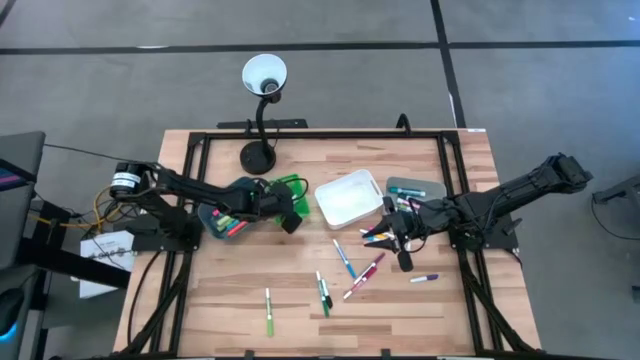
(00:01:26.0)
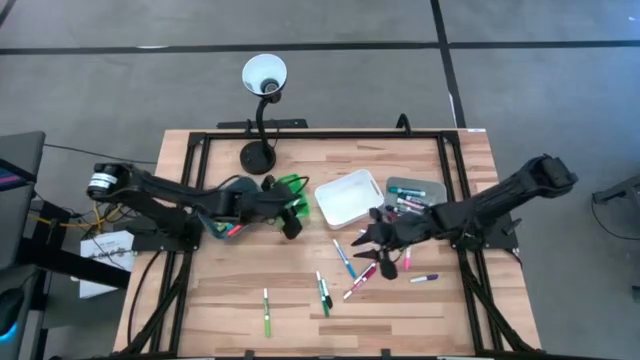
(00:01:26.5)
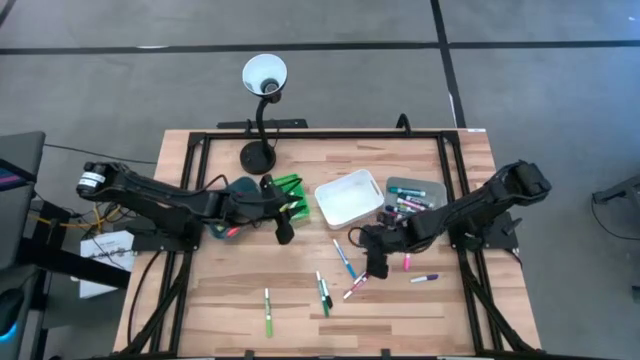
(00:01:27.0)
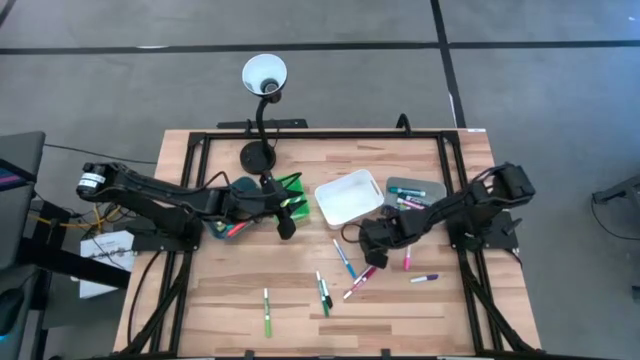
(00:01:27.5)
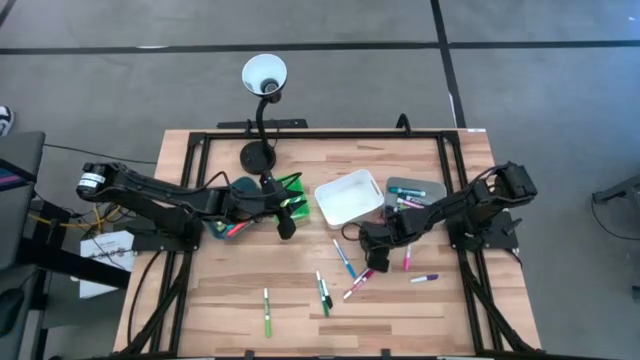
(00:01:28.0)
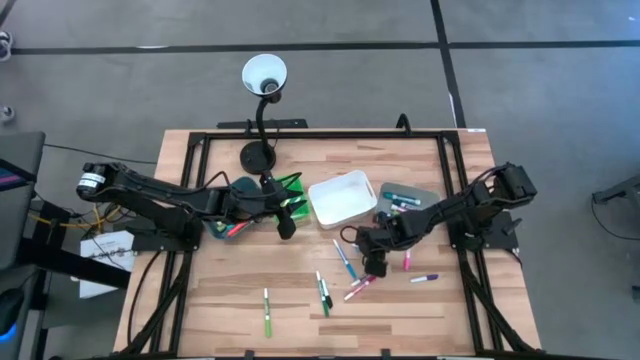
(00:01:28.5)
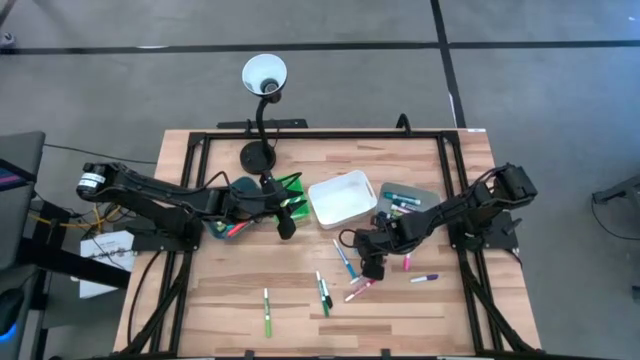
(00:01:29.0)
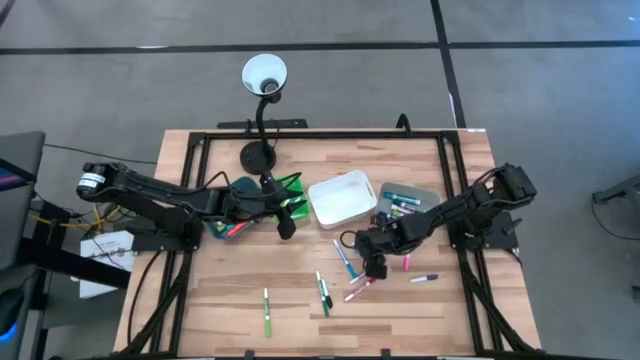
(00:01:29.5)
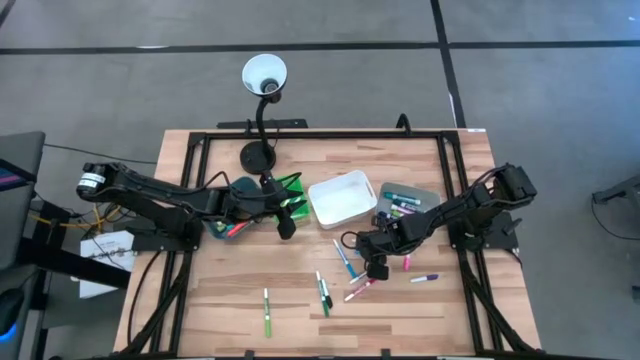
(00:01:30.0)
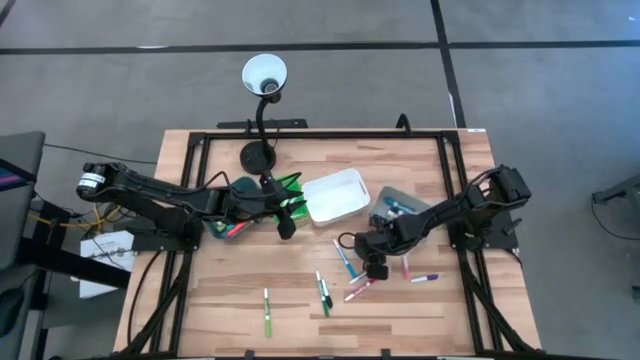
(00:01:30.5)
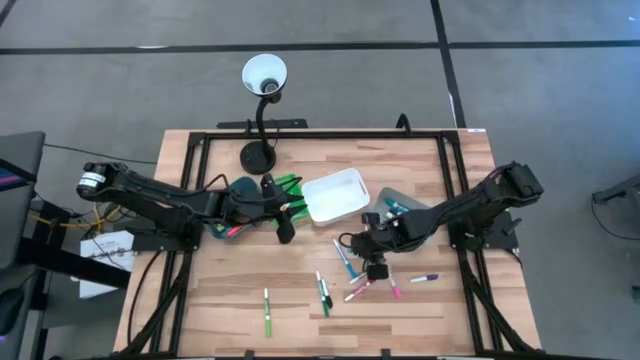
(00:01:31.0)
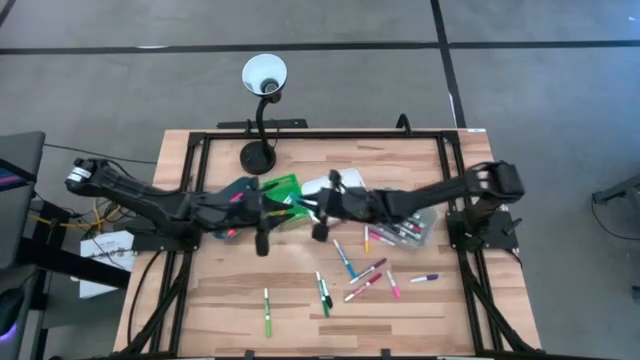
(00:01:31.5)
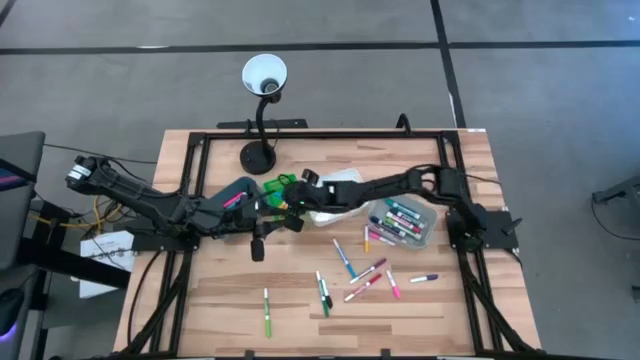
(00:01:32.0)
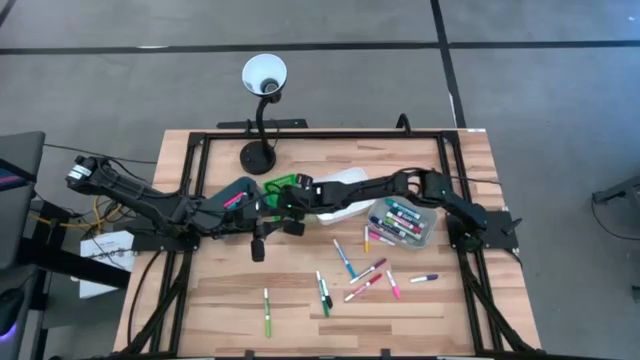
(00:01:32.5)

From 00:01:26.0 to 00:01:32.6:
Task: Pick & Place Markers
Put the blue and white highlighter pen into the green bin

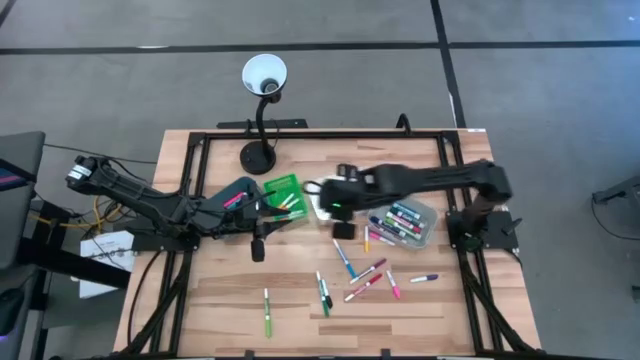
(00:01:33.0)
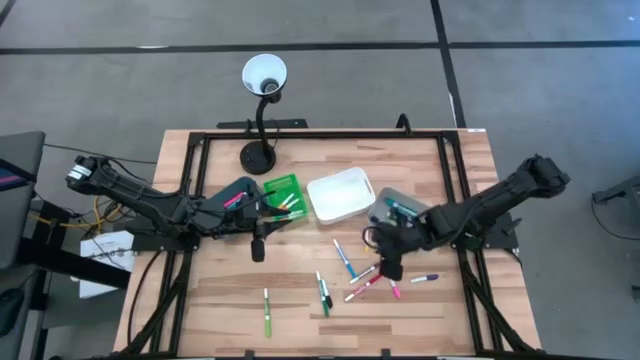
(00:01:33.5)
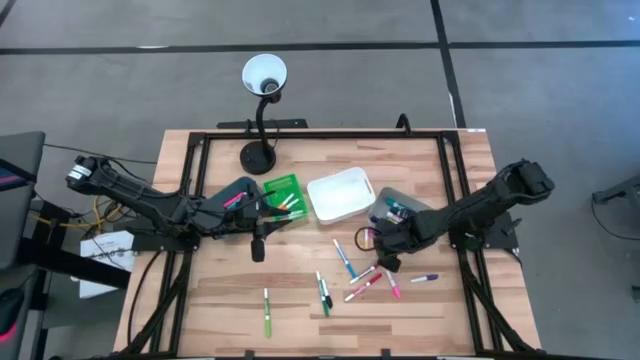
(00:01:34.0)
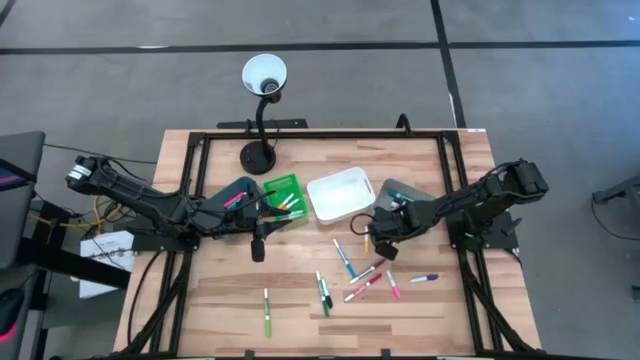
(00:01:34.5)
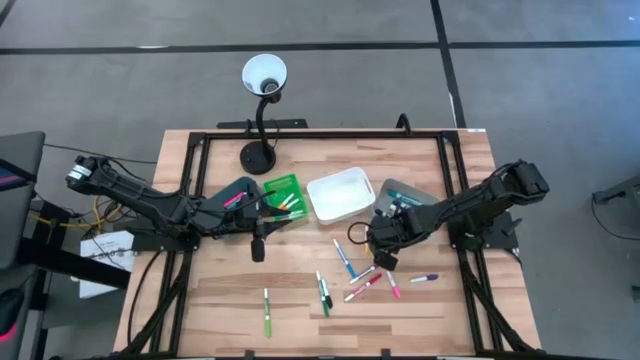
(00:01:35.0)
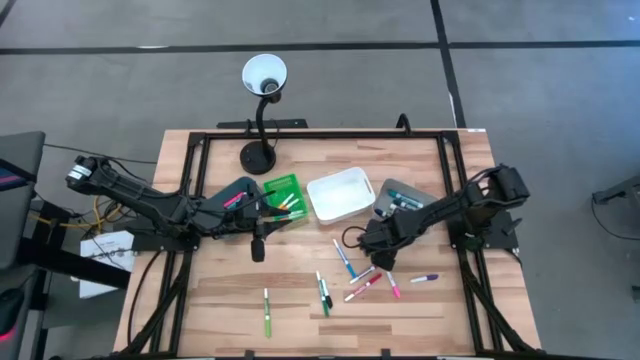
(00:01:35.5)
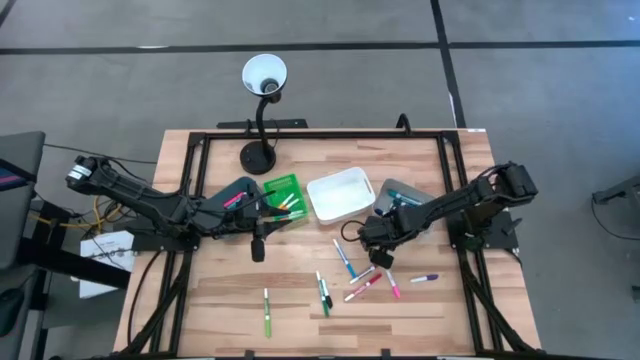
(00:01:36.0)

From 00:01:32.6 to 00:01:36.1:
Put the pink and white highlighter pen into the green bin

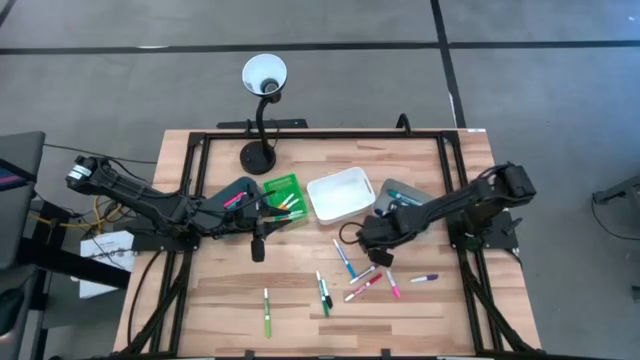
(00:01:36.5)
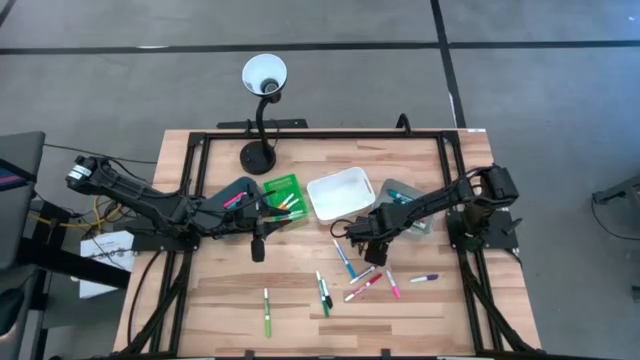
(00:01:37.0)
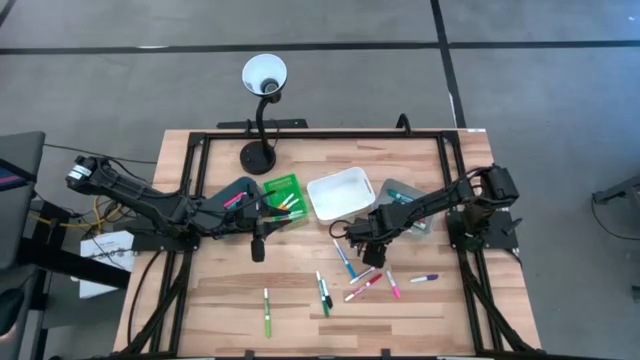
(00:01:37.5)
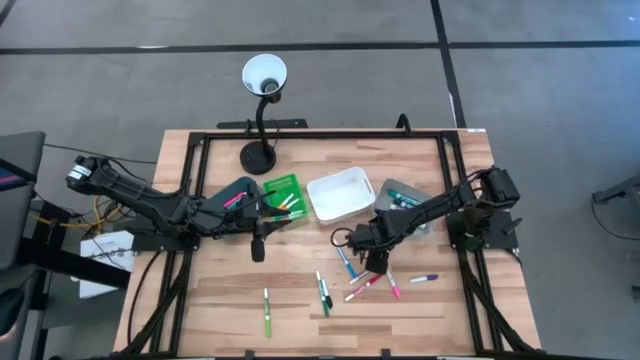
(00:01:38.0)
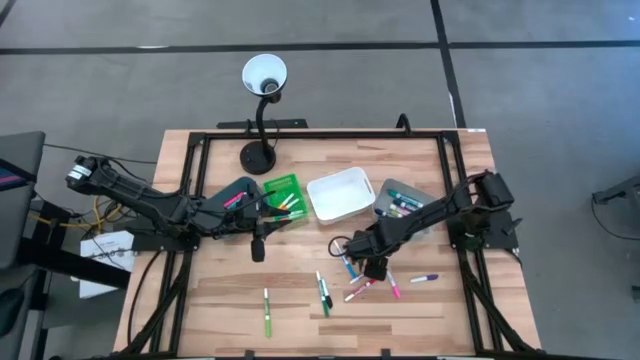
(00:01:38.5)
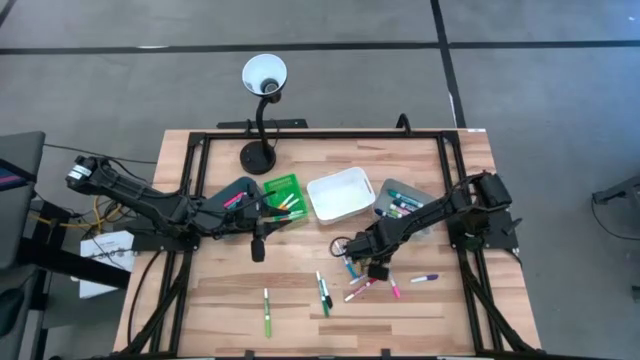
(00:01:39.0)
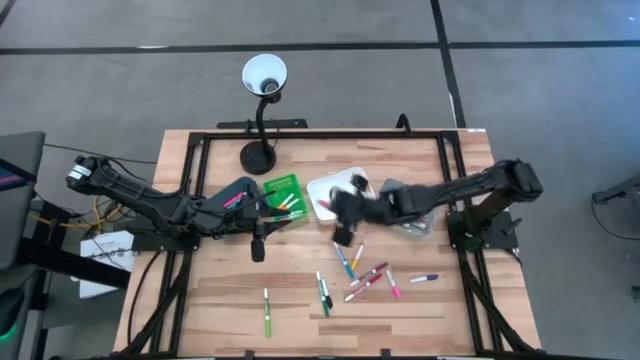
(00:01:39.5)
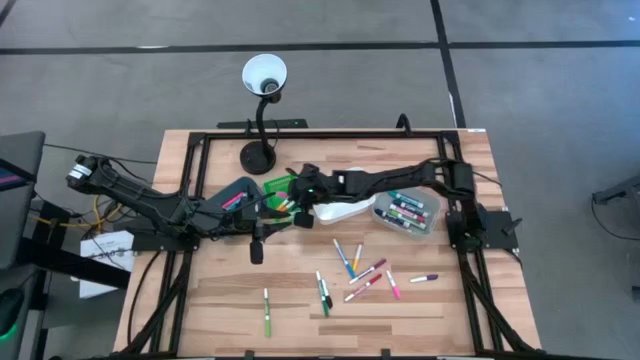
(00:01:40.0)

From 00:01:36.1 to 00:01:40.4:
Put the pink and white highlighter pen into the green bin

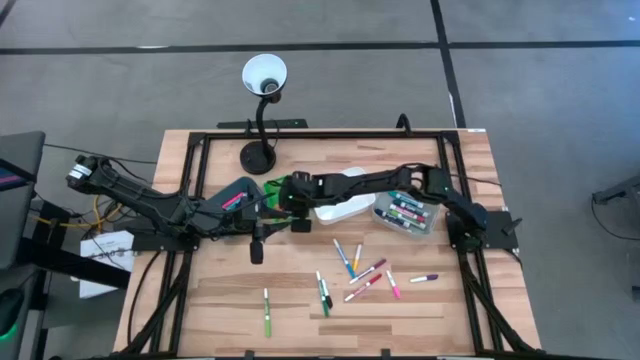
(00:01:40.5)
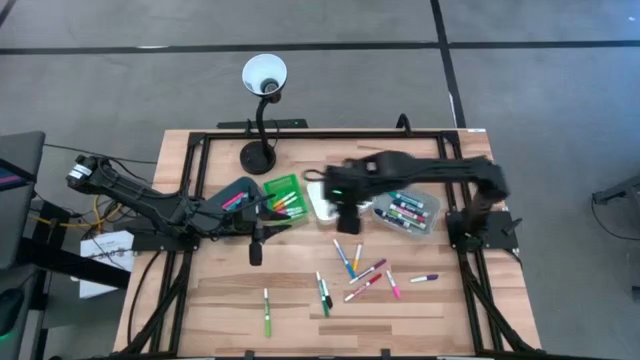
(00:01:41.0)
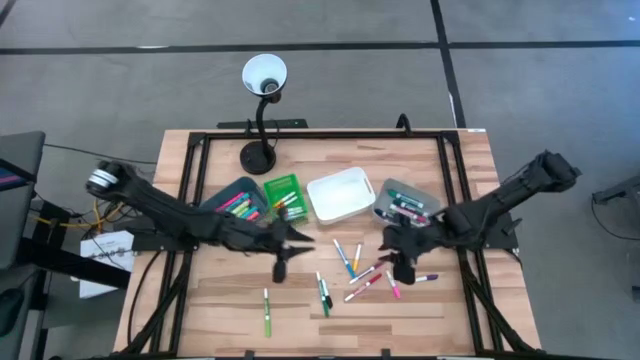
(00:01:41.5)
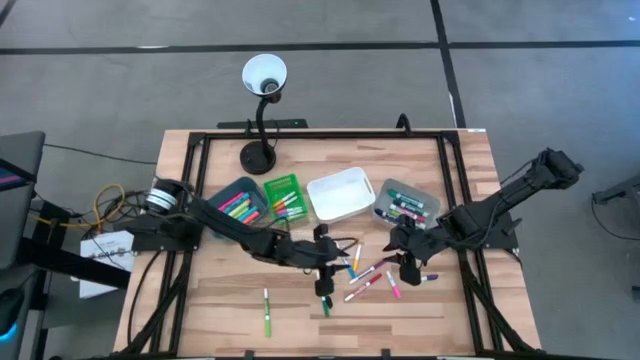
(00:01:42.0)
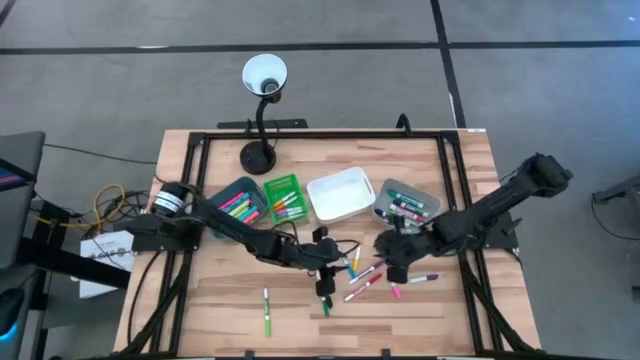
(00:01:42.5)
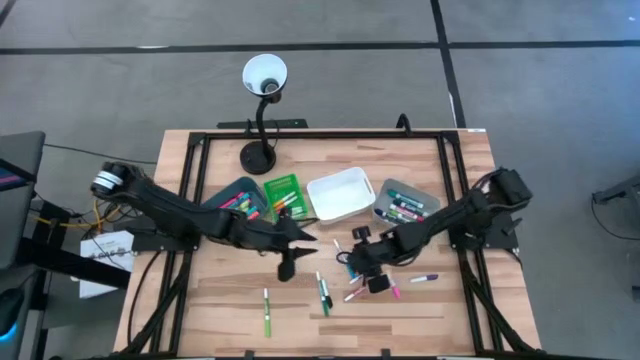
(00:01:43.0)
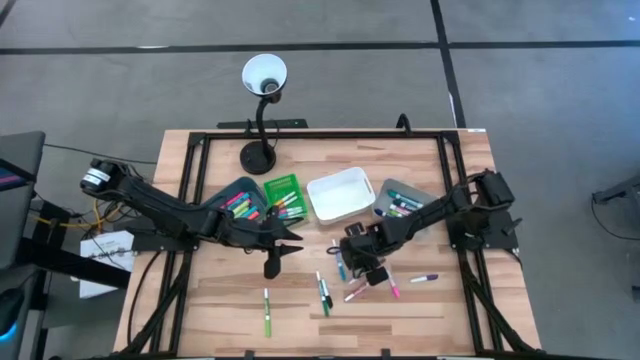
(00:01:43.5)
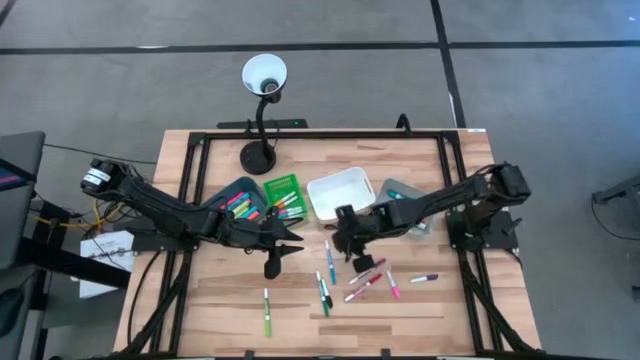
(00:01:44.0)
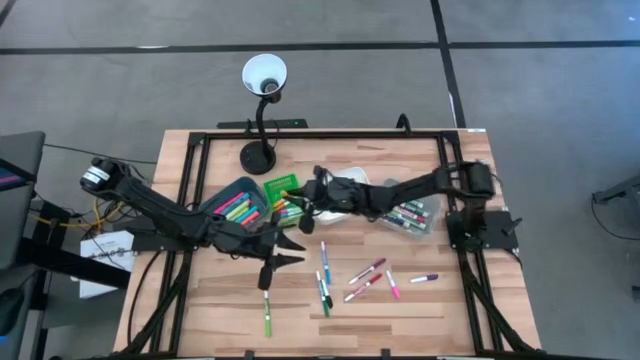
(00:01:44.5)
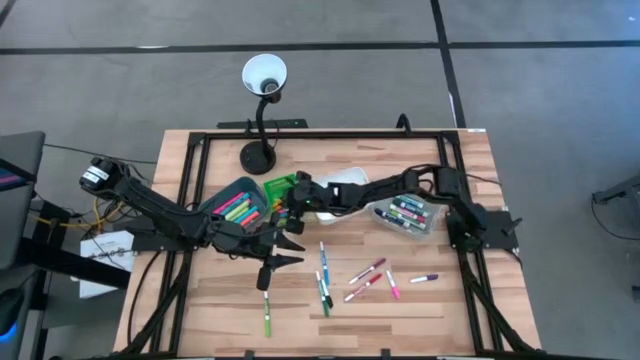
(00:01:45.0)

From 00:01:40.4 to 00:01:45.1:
Put the yellow and white highlighter pen into the green bin

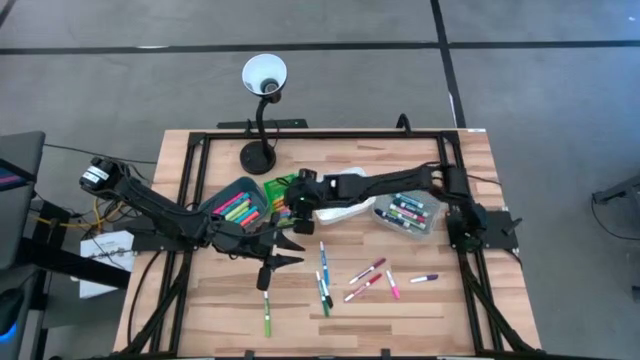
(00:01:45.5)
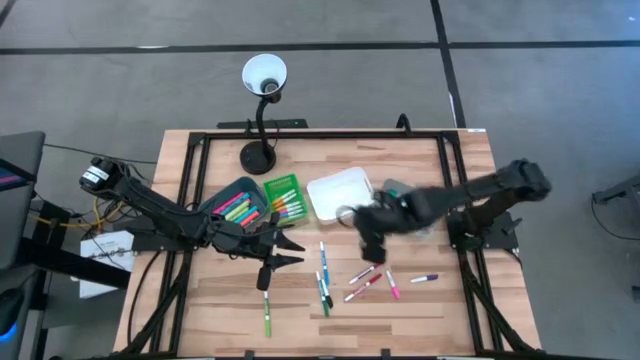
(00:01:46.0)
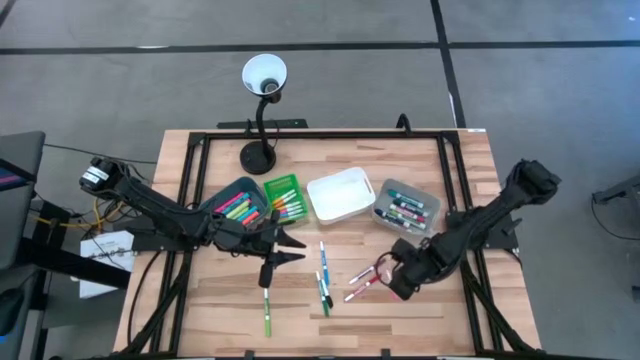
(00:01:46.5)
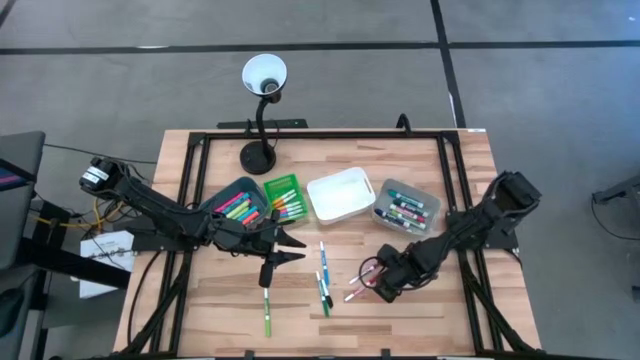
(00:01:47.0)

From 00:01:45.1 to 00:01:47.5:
Put the pink and white highlighter pen into the green bin
